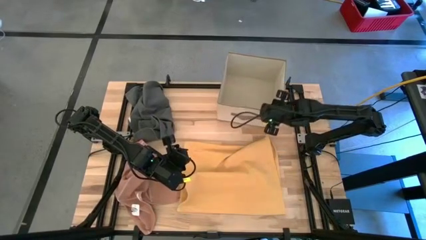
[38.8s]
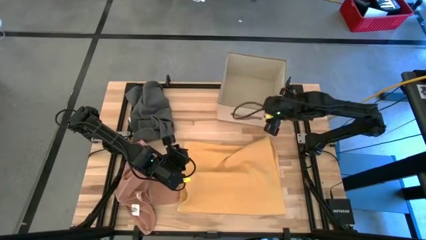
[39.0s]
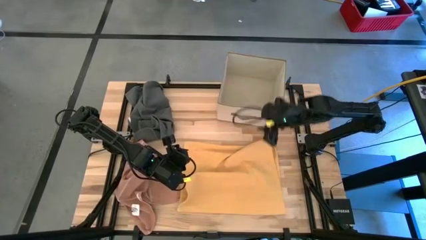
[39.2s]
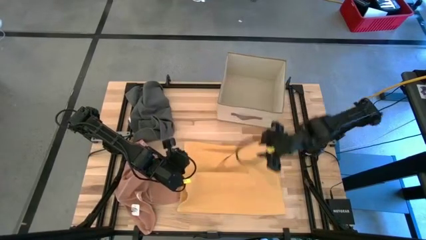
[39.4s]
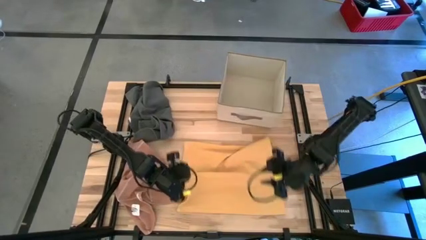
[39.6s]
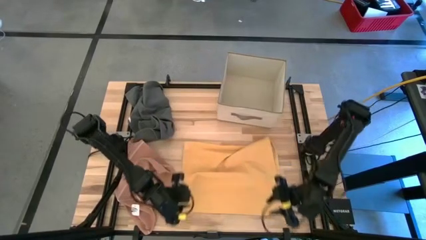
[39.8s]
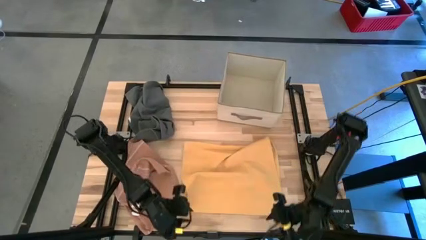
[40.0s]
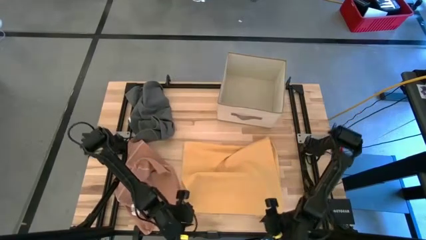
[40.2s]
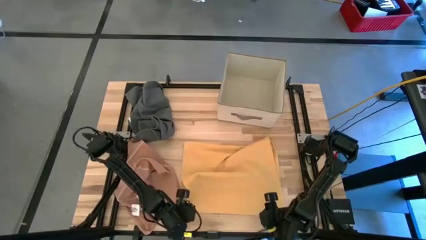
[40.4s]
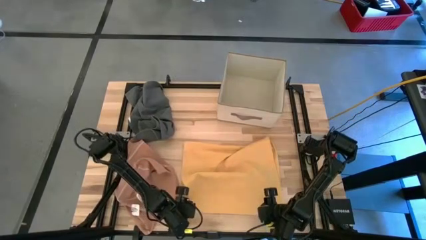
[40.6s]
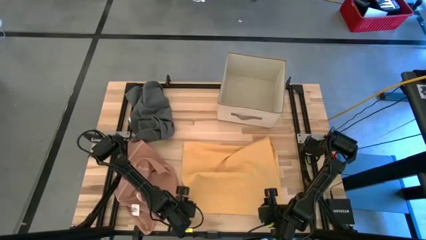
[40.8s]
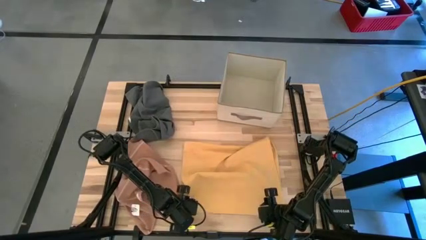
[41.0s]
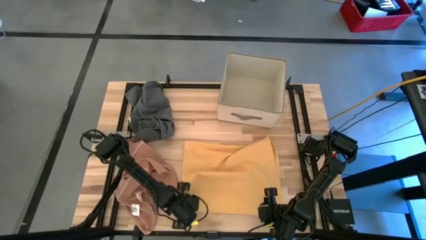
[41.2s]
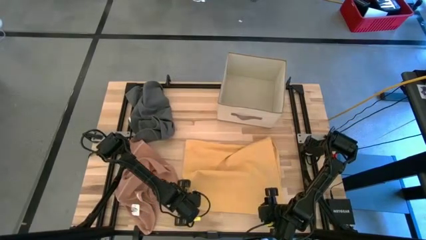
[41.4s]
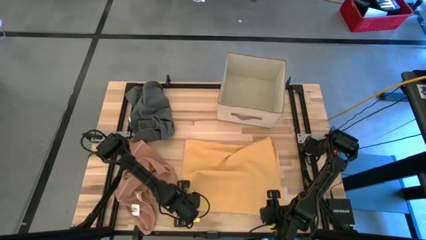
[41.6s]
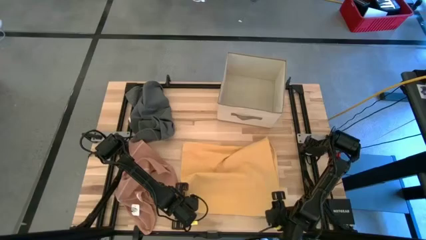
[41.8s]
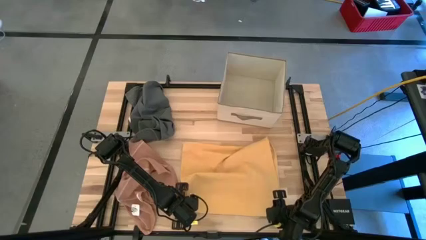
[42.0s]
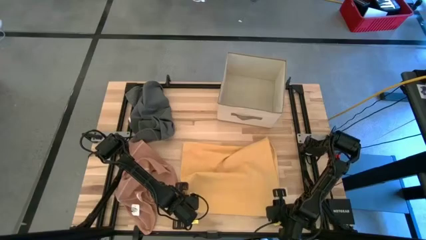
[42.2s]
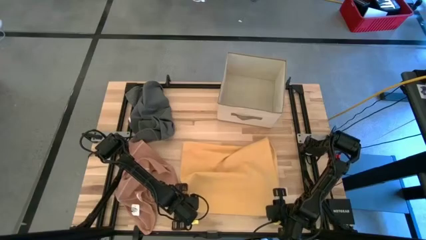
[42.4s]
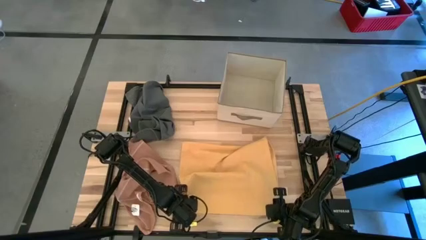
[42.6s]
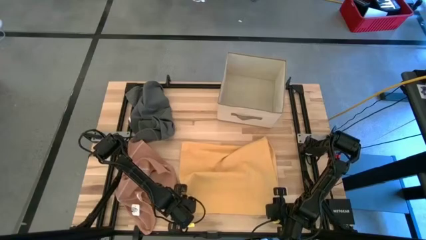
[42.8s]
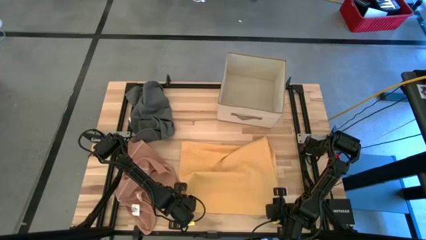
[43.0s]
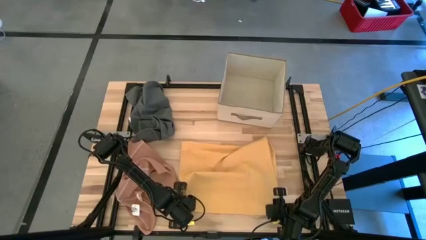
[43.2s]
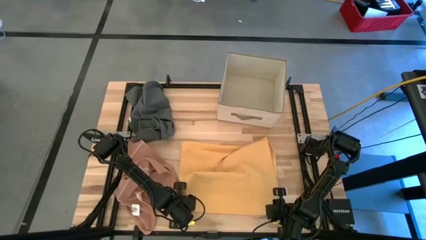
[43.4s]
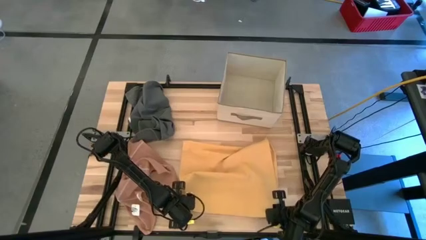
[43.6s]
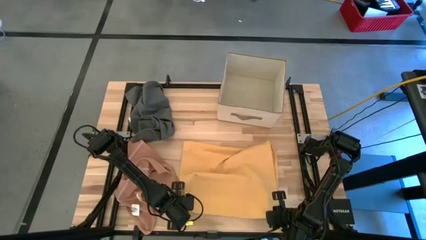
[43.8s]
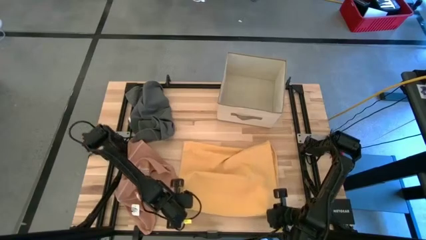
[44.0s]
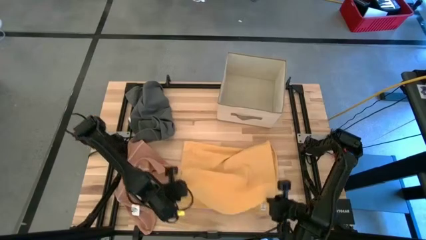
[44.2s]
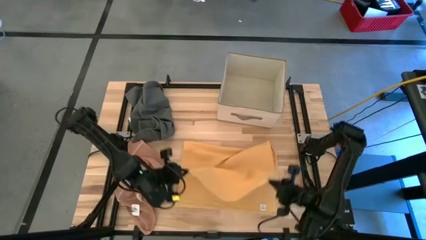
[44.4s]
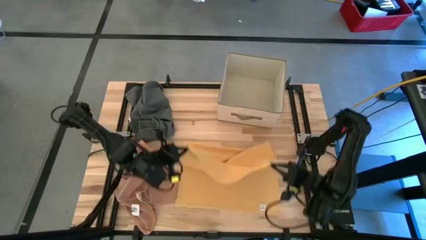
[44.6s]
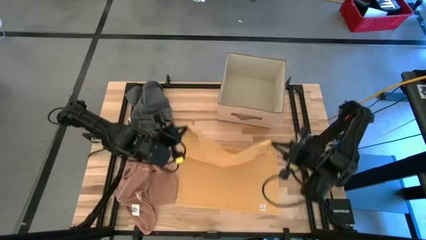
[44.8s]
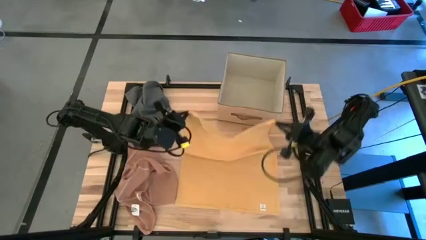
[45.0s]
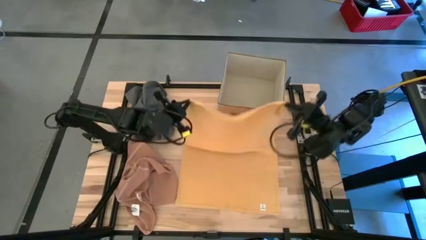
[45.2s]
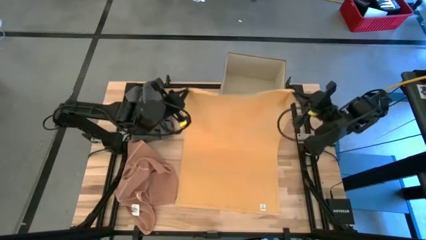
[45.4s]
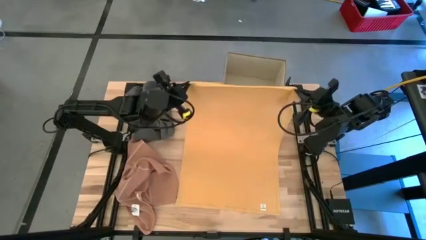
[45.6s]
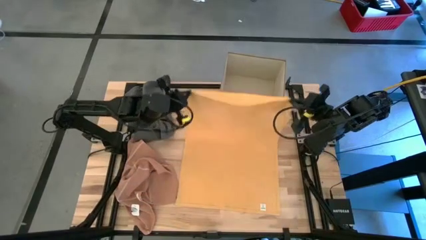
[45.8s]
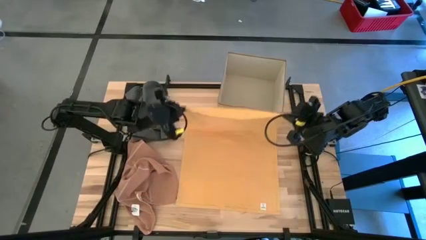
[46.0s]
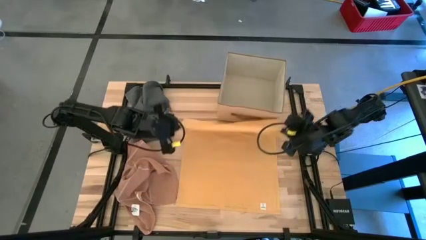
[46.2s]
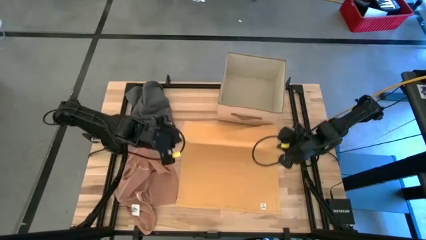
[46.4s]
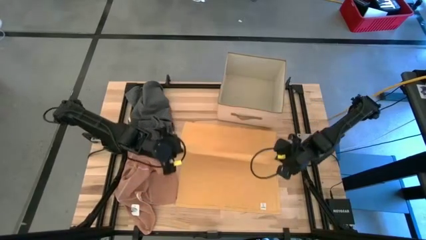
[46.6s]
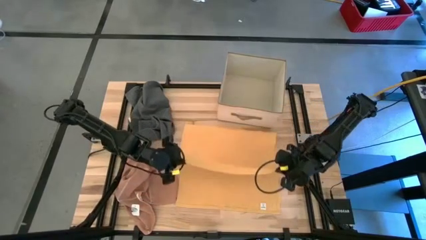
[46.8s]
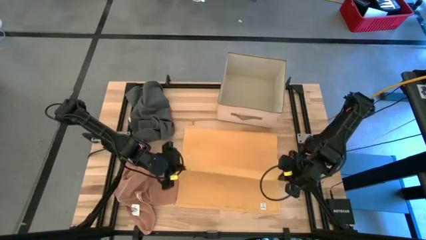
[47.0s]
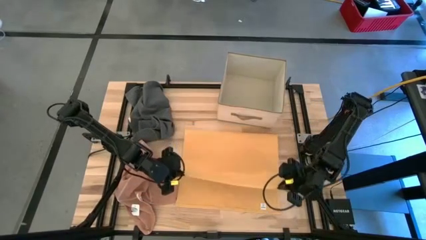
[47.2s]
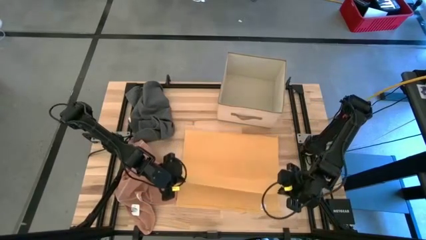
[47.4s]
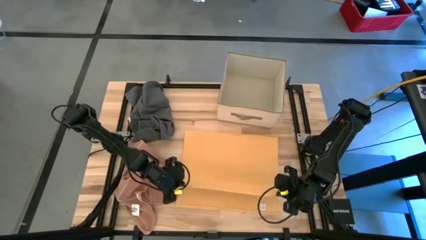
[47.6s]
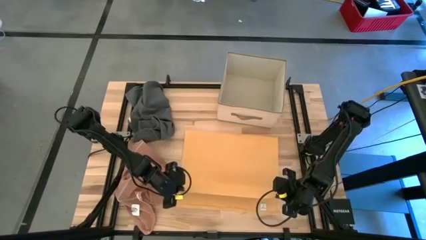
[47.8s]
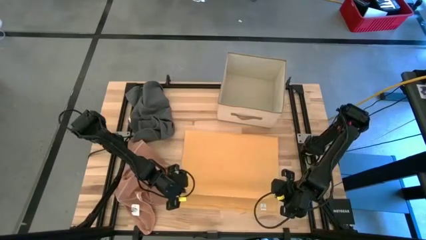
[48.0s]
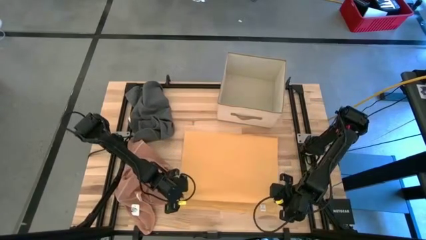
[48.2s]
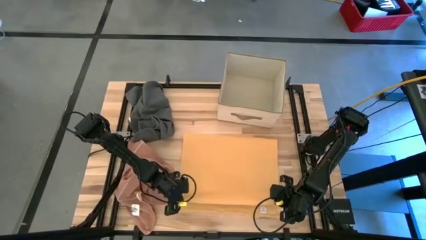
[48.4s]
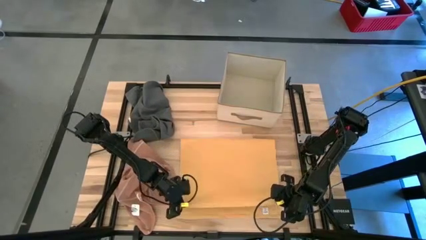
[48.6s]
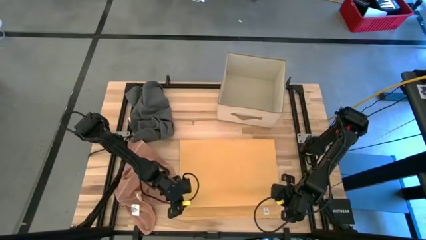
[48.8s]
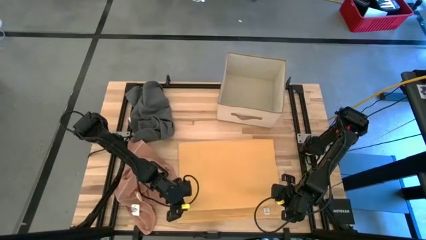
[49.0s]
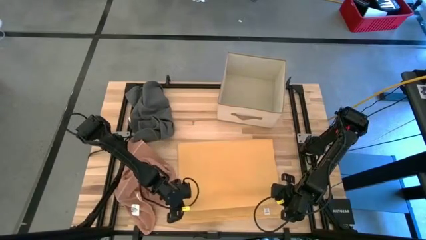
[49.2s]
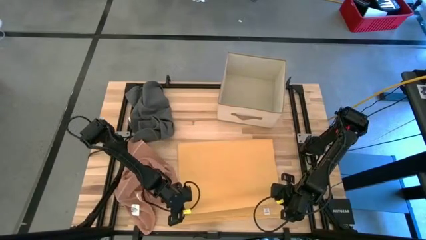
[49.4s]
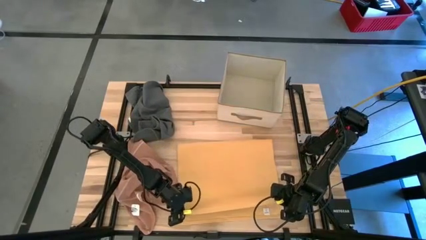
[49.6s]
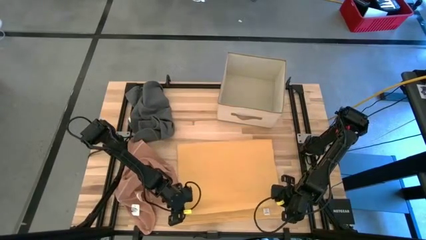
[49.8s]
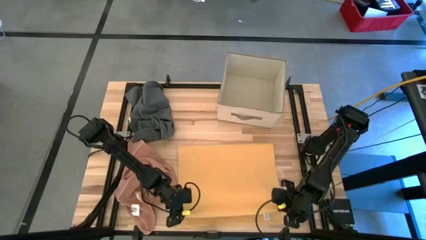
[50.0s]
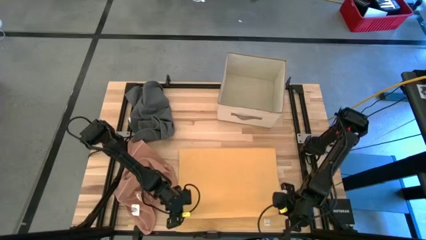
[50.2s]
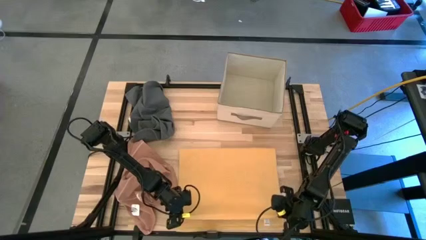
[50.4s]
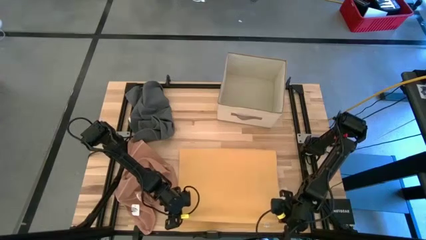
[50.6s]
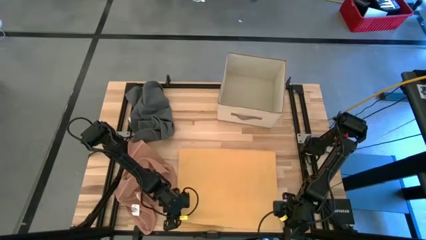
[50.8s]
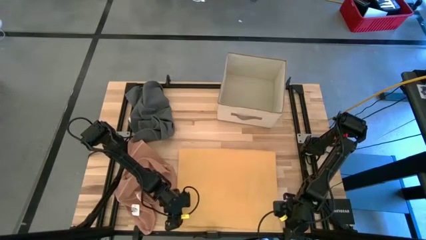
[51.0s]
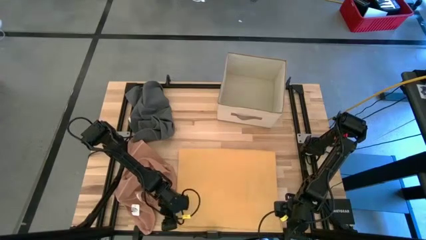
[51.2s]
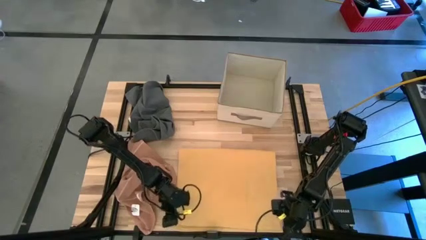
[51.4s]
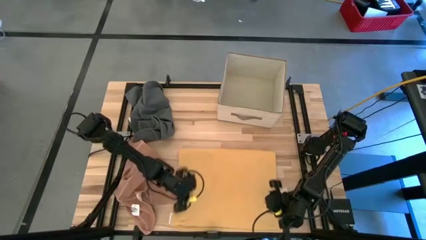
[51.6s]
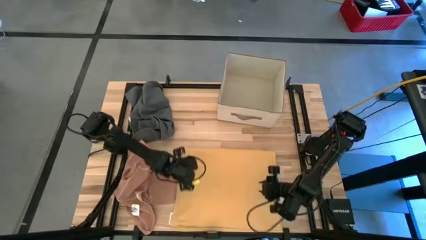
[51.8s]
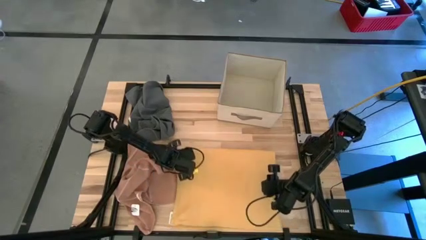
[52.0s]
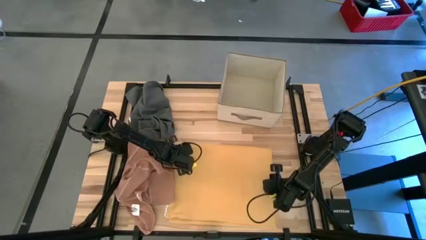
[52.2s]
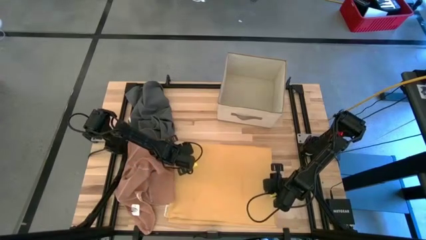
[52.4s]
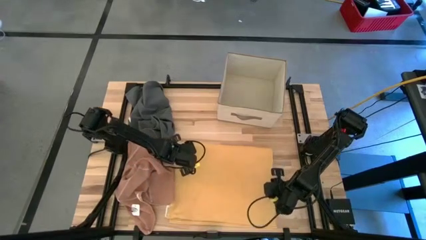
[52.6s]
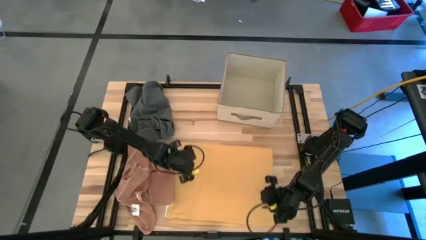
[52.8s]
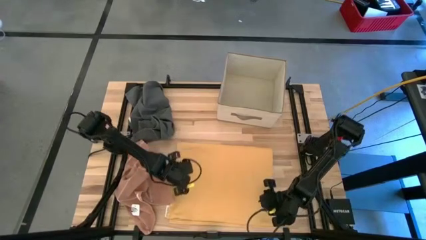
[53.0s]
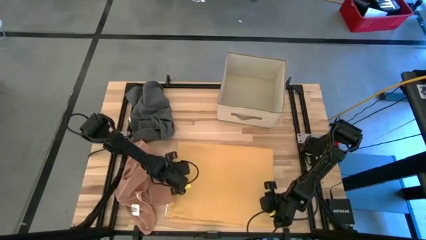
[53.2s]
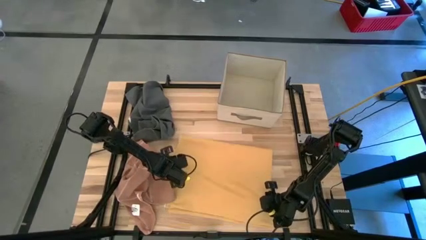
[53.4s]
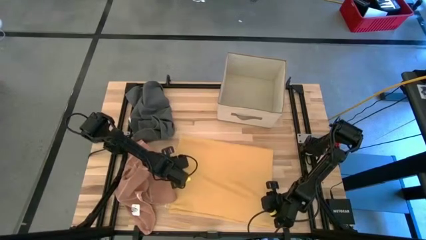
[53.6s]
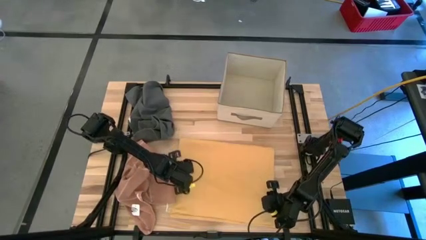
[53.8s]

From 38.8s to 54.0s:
Task: Fold towel
Fold the yellow towel

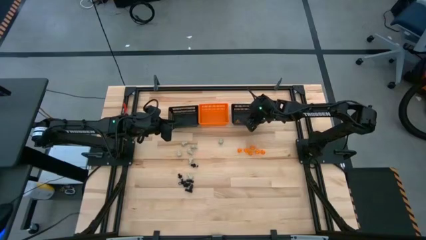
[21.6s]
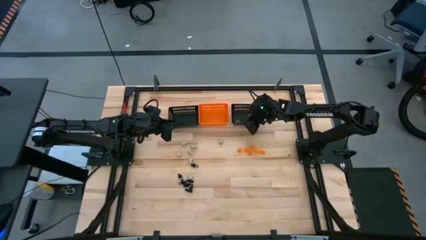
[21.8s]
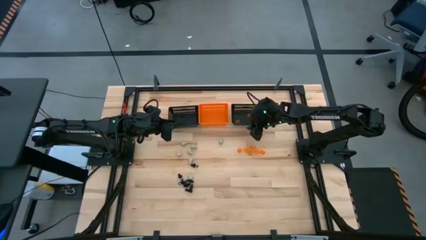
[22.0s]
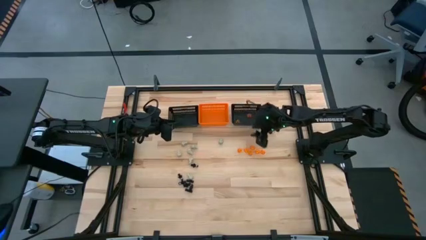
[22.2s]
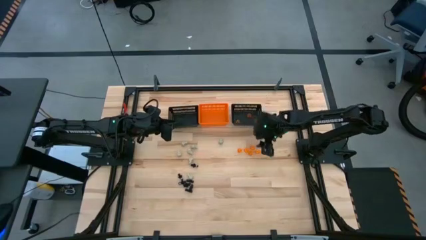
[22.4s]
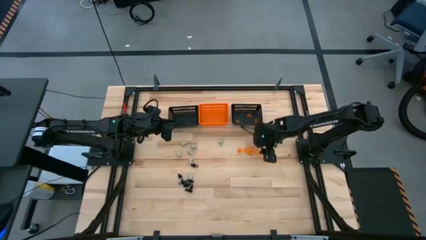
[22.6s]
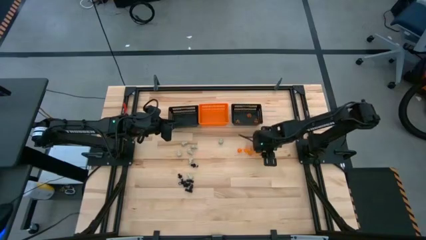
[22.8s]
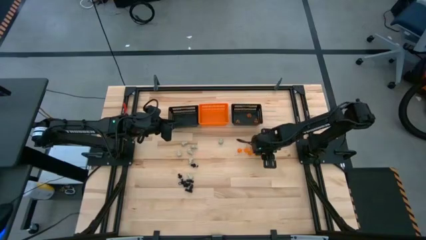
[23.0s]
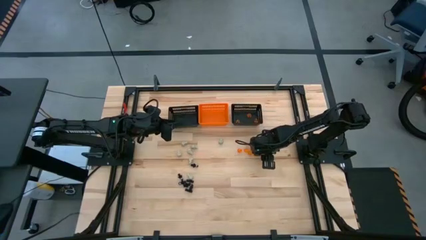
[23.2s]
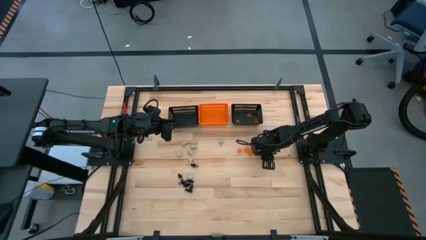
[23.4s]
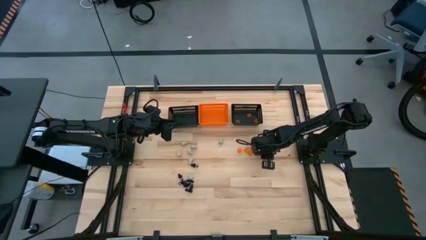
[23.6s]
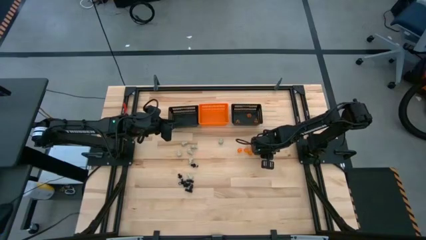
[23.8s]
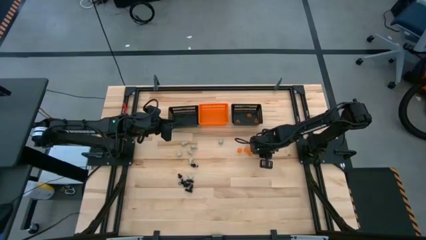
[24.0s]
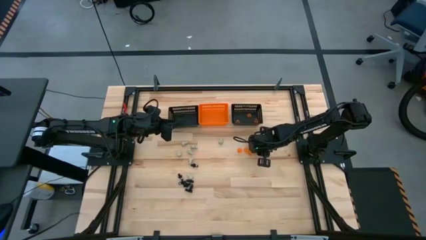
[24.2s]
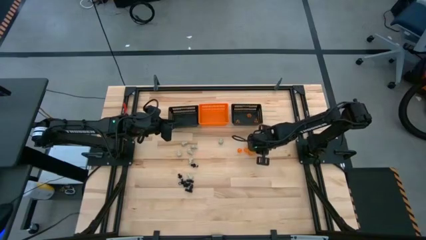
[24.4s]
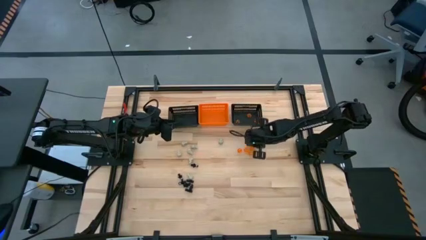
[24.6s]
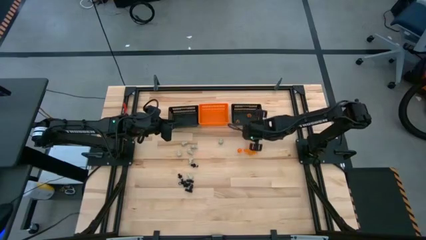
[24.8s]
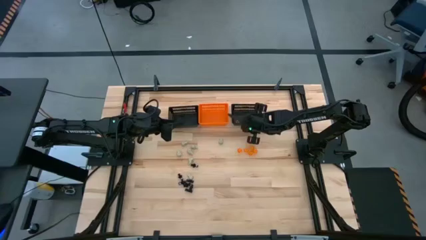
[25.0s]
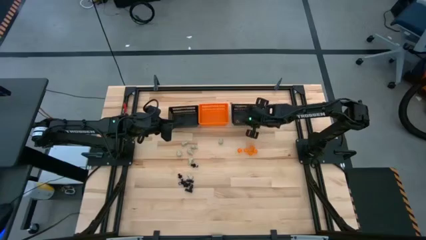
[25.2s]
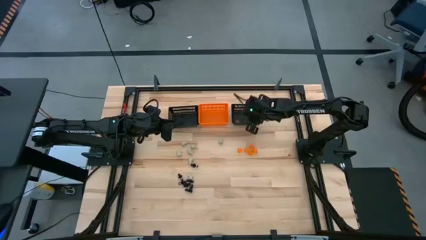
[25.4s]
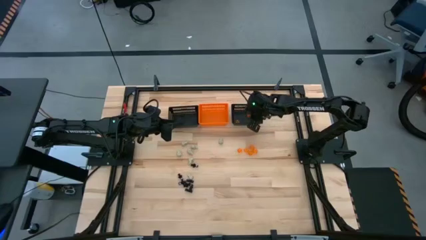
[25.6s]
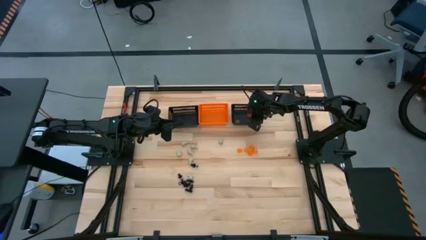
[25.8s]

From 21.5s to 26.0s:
Task: Sort Halloween decoration
Put the orange pumpkin toy into the right black bin
